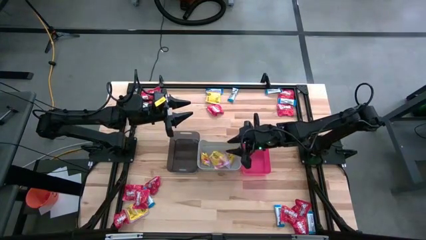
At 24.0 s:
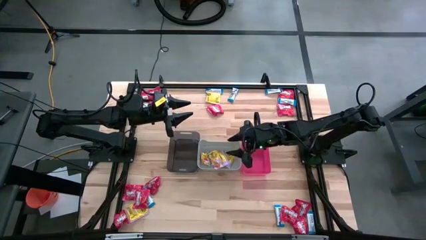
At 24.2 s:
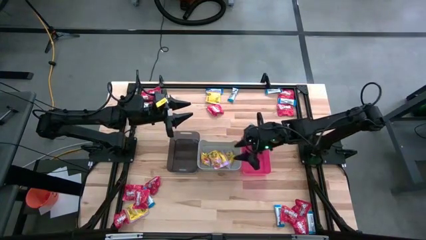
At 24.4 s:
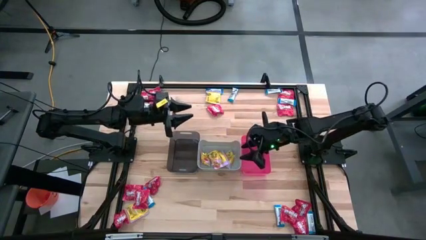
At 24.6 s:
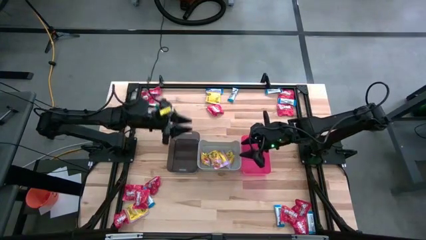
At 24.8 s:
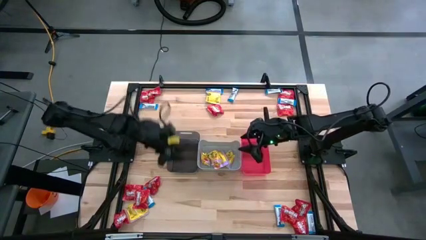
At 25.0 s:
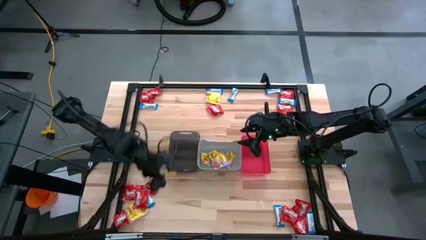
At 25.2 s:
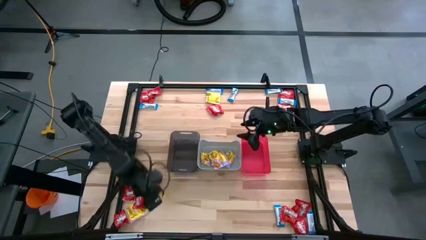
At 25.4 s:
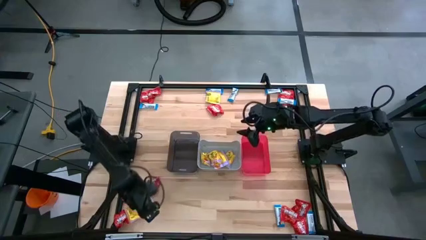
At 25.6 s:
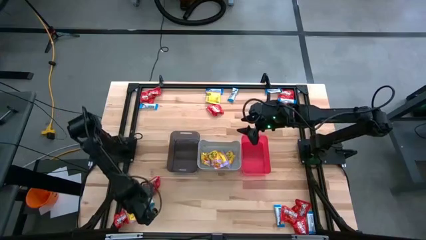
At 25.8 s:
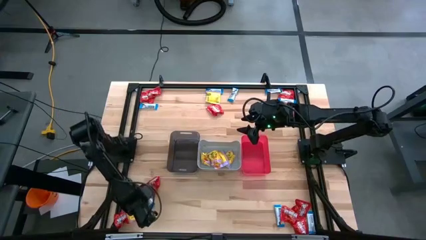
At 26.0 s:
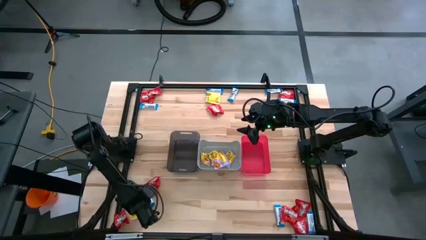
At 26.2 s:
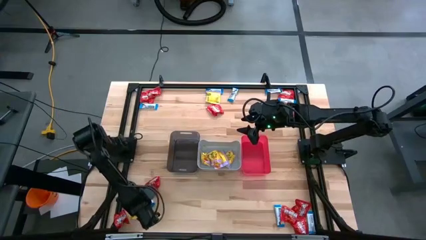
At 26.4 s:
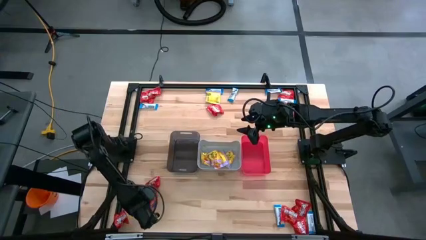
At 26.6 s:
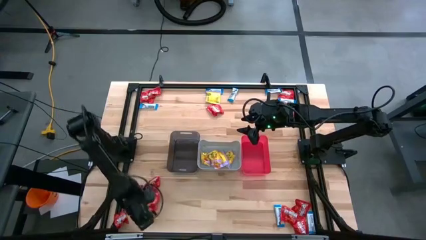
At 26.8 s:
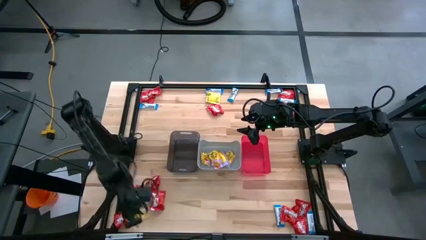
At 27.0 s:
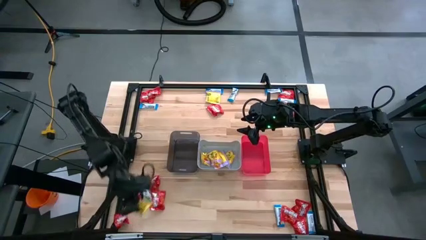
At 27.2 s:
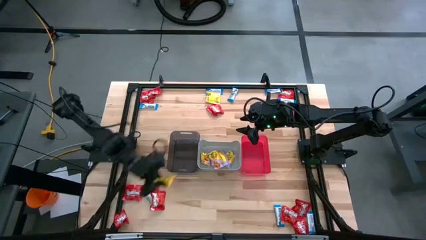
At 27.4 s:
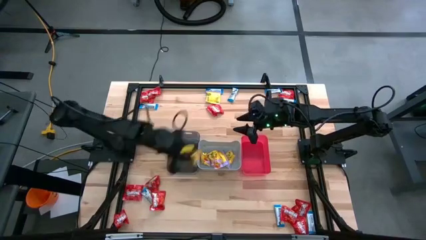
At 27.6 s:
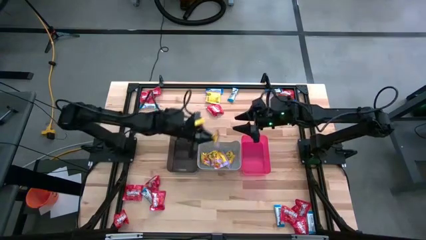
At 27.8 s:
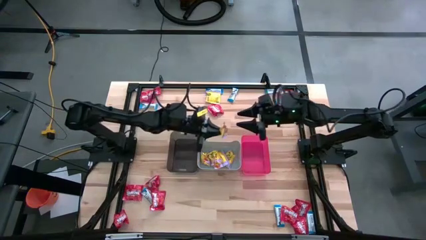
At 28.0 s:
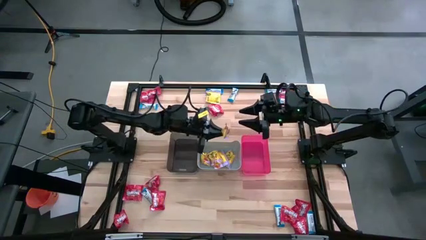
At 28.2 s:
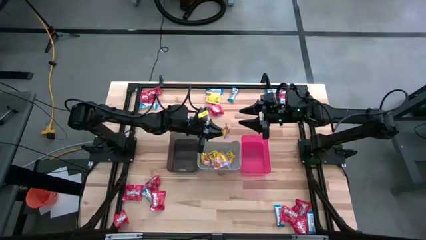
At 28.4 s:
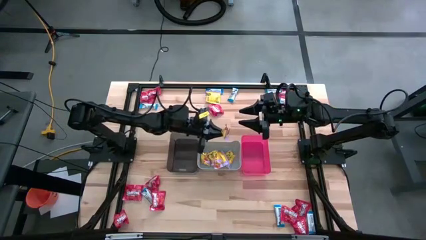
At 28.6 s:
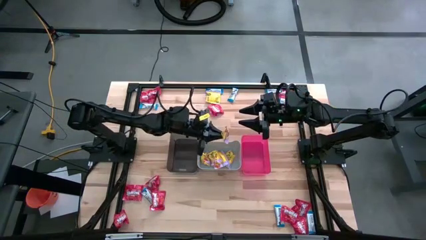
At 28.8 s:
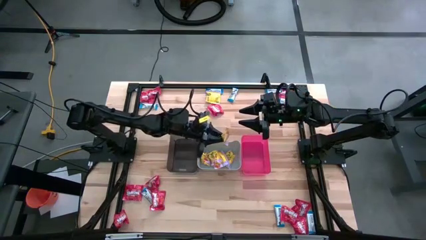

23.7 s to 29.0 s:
Task: Sort candy
Put the yellow candy into the gray bin

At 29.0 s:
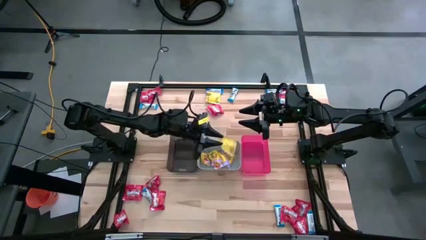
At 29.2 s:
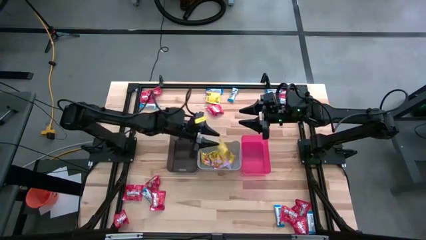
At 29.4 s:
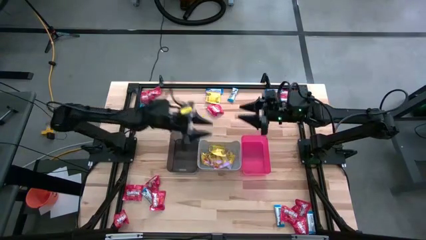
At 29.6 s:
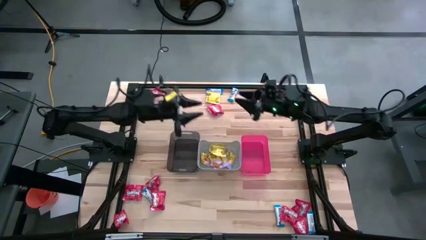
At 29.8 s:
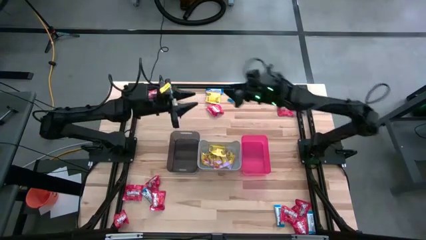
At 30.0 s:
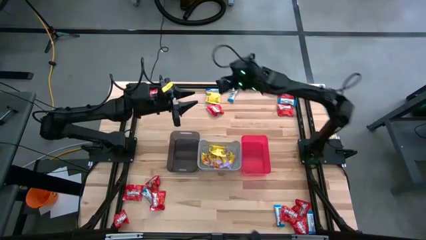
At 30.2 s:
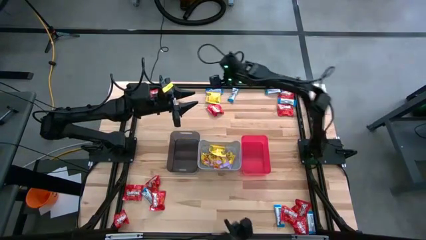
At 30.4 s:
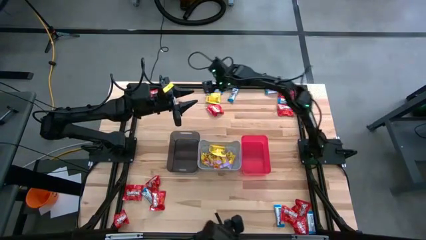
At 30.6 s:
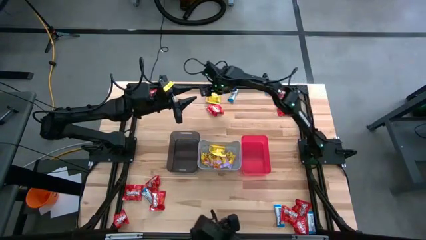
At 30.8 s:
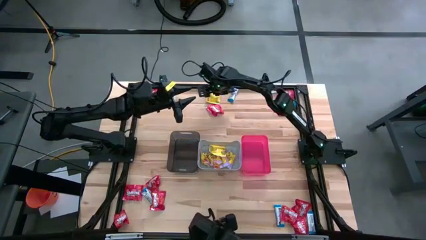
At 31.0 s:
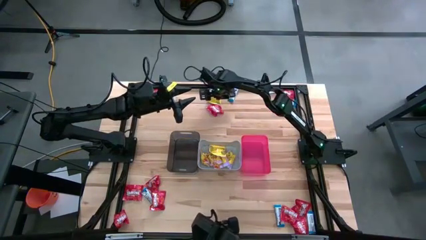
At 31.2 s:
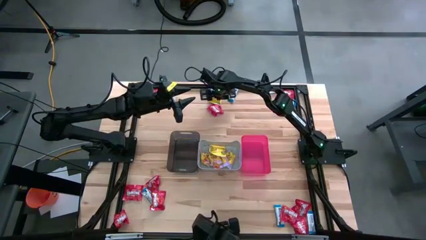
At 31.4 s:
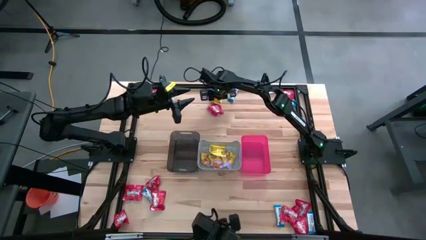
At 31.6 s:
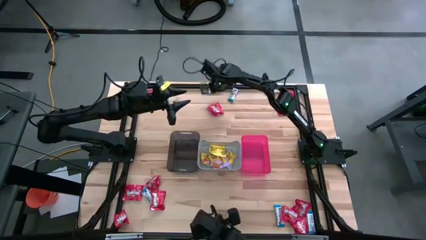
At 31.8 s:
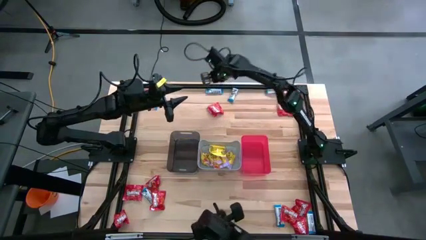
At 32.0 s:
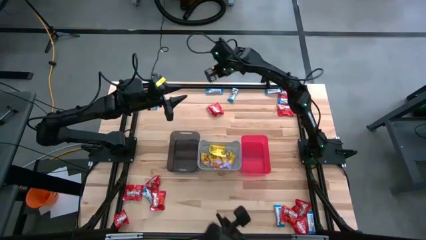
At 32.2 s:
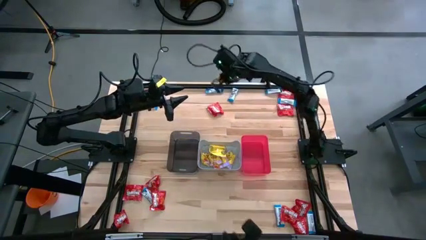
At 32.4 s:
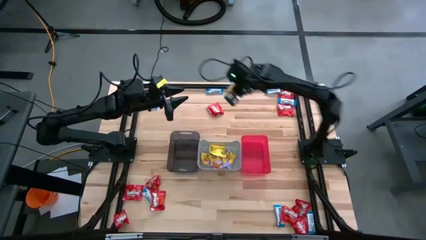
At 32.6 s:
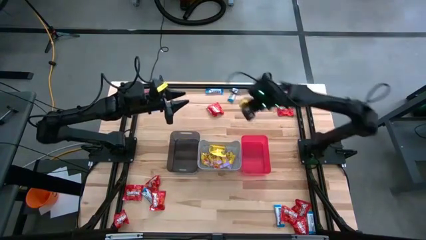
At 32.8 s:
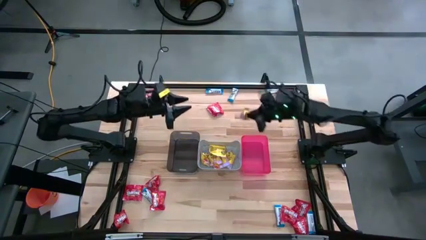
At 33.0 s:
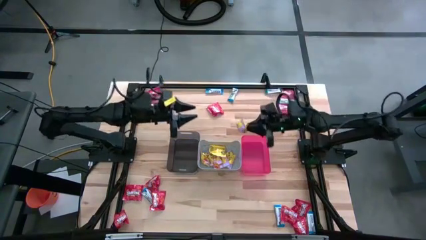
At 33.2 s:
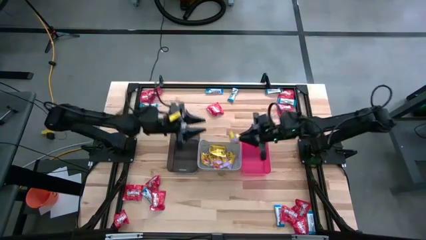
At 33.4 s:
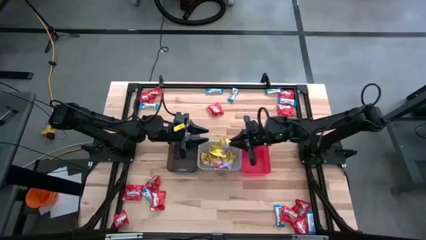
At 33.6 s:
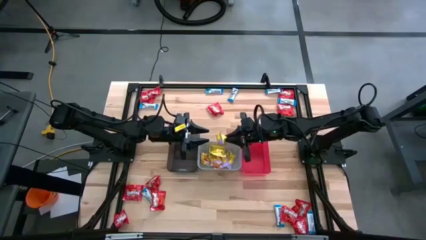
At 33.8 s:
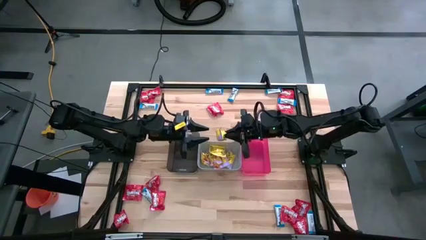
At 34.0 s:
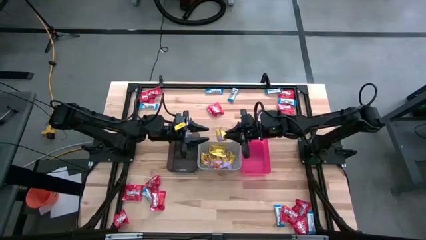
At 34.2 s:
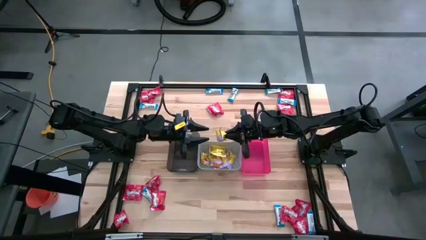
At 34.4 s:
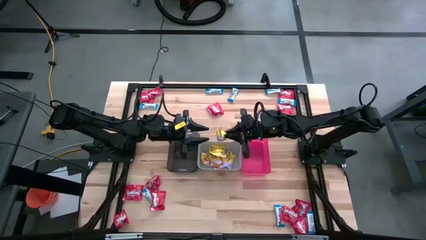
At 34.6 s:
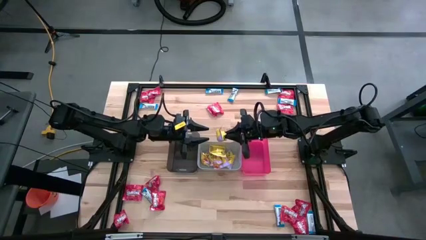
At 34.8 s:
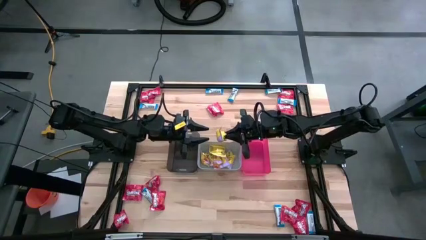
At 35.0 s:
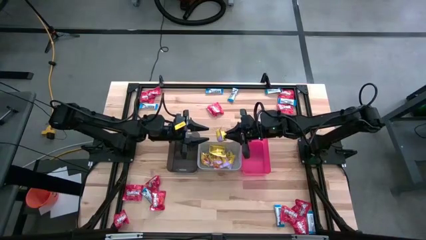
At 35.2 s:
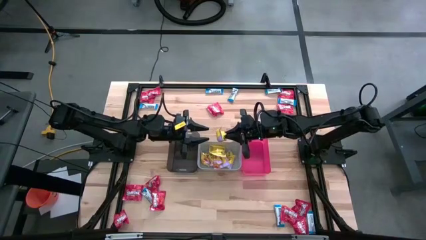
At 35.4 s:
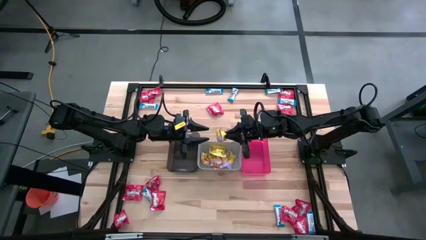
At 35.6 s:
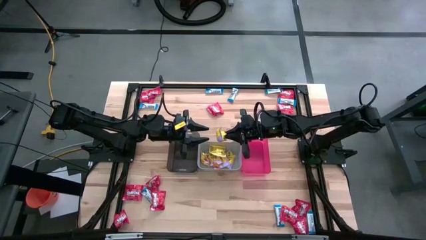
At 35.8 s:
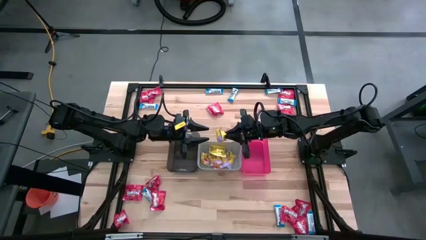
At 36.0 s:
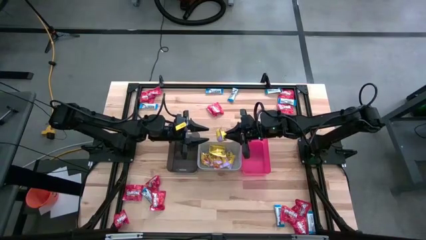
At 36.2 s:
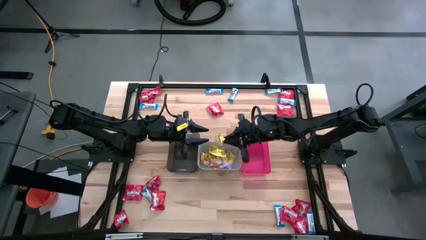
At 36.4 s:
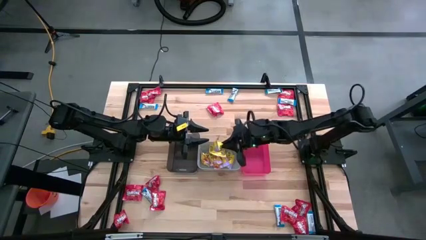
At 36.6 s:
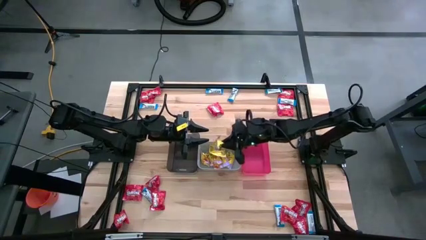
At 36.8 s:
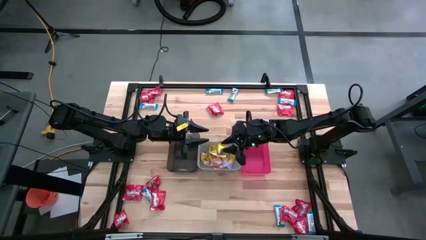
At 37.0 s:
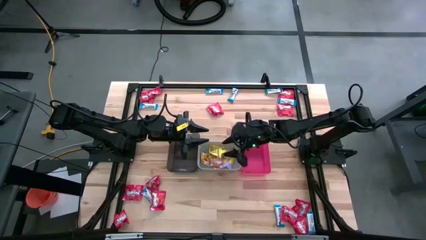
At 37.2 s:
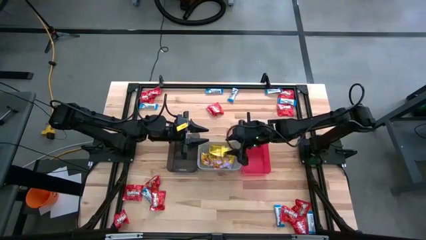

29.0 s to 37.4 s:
Put the yellow candy into the gray bin

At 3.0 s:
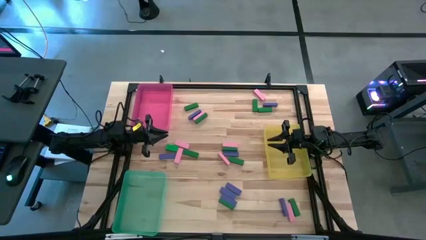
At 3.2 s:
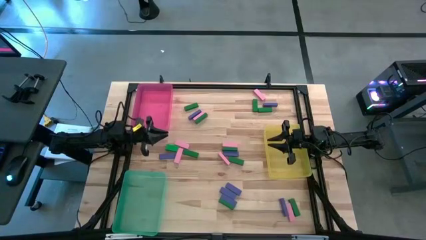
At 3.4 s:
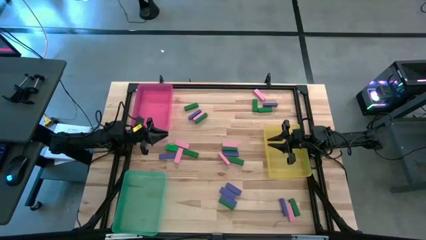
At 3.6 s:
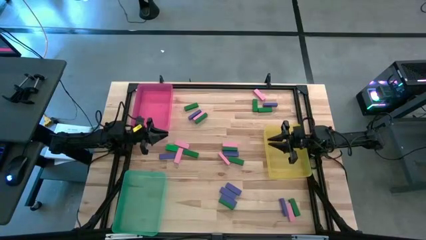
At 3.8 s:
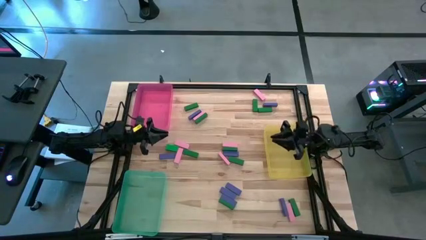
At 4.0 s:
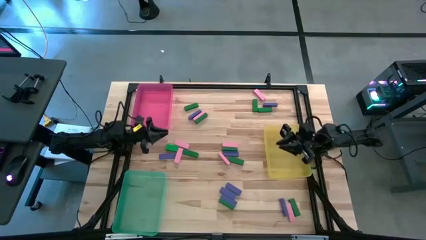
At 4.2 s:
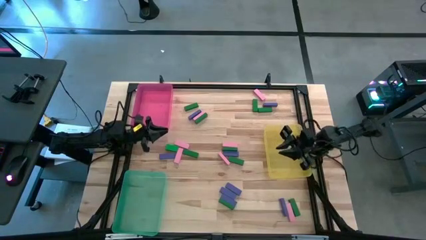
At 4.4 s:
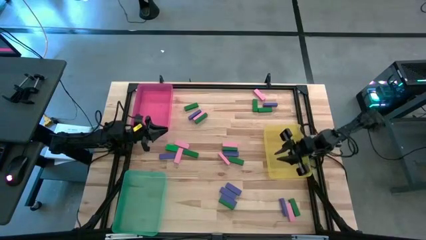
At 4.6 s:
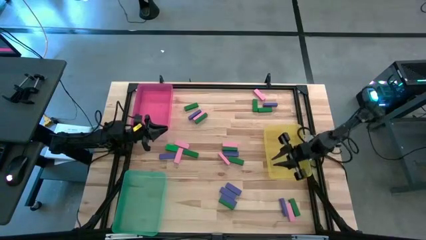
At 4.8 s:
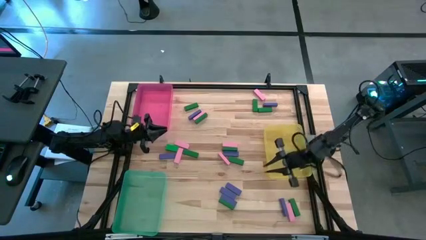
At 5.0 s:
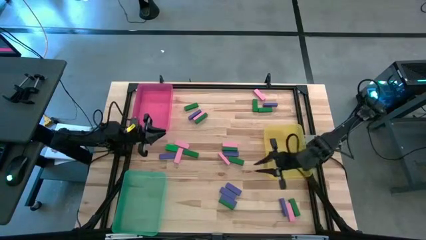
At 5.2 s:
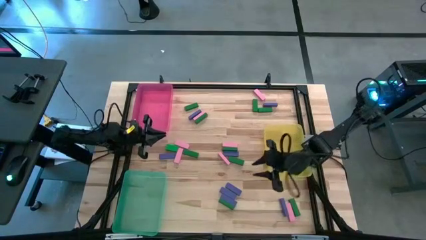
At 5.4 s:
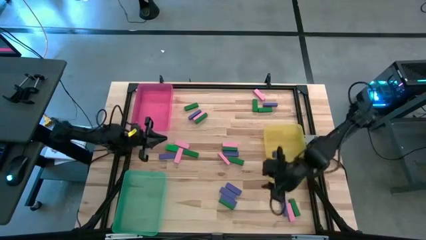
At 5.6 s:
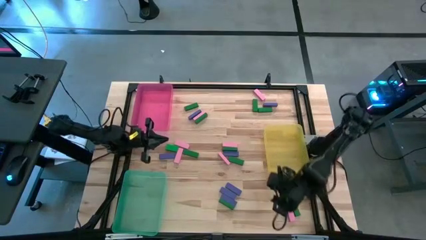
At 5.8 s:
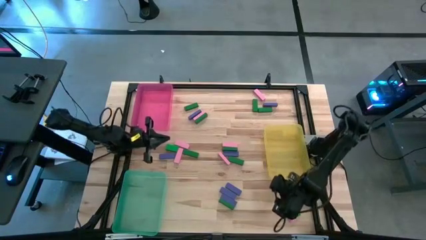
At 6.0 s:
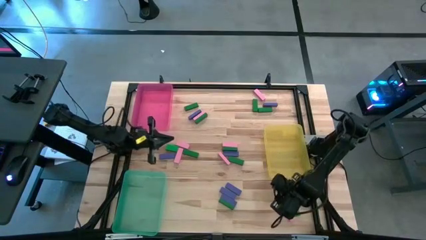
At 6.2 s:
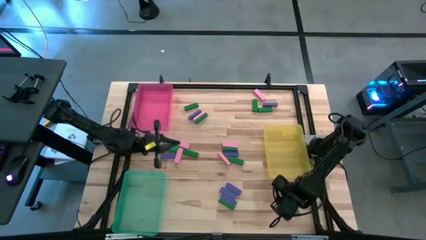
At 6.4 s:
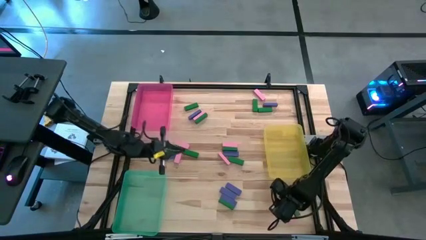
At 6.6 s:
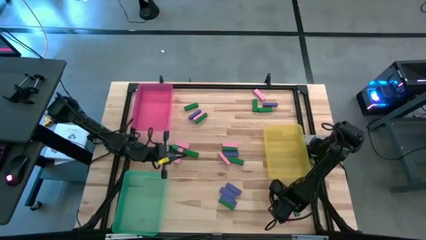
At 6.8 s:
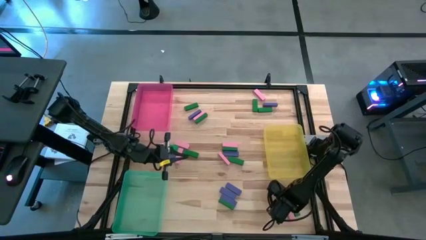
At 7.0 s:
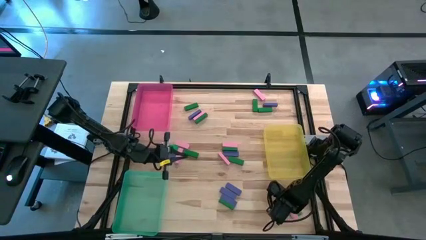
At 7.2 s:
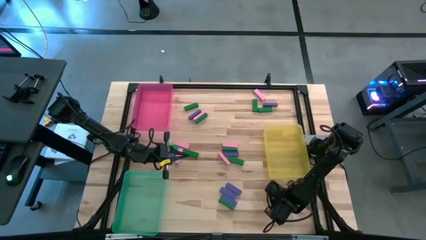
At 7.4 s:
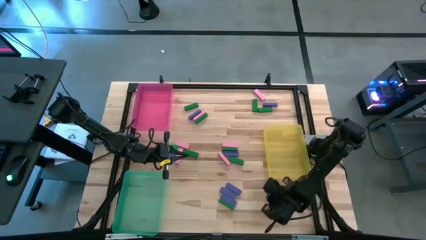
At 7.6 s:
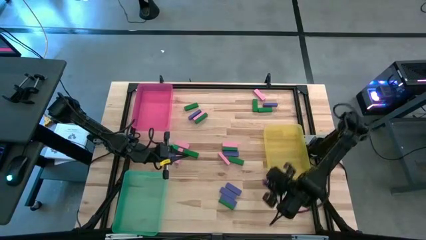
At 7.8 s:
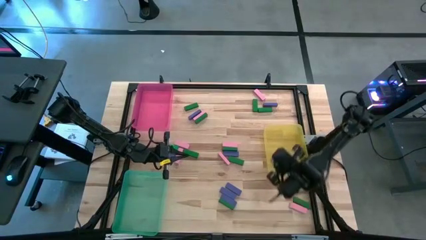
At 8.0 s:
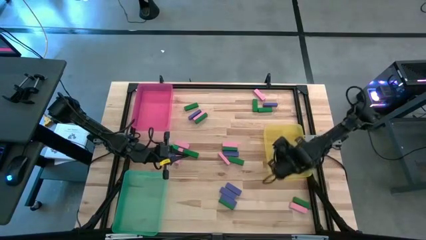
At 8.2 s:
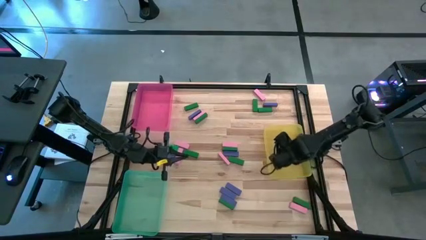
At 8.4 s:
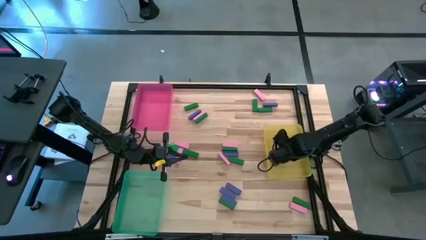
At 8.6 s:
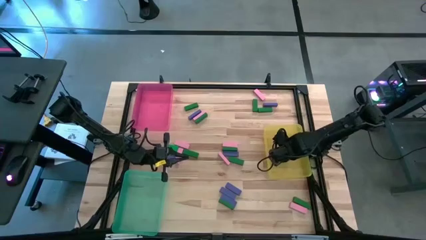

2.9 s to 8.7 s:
Task: Sort blocks
Put the blue block into the yellow bin
